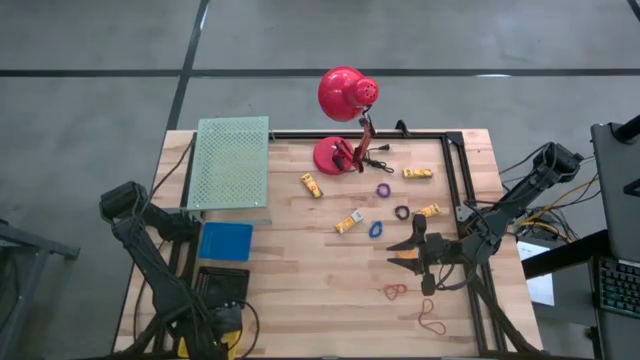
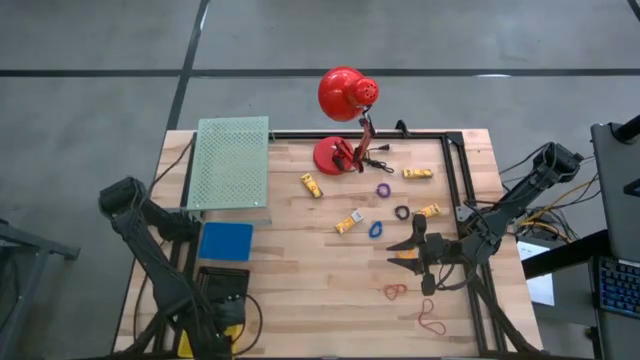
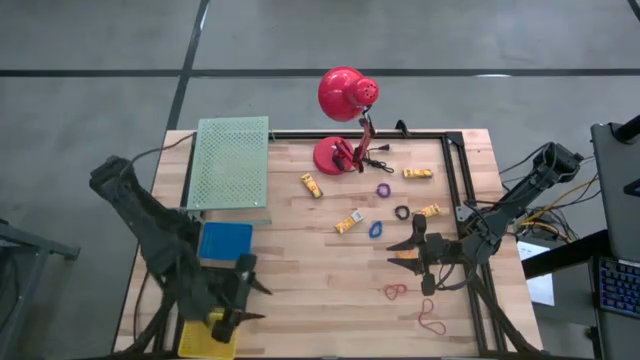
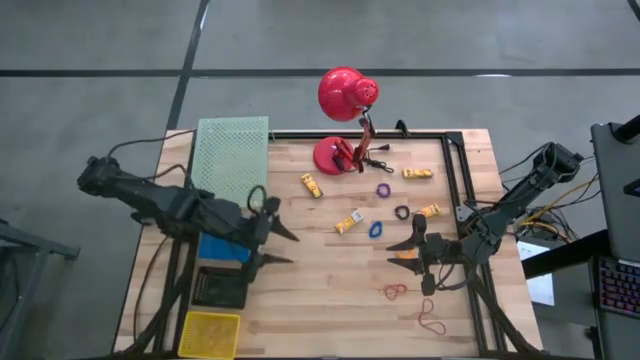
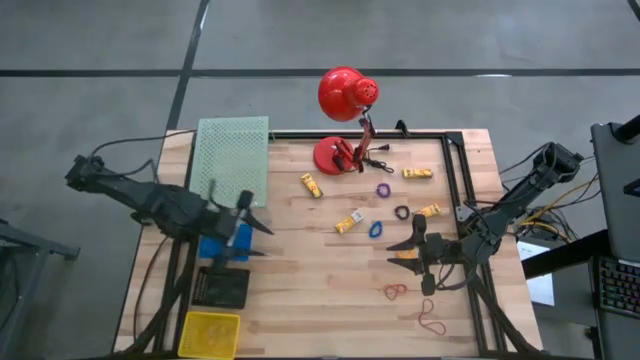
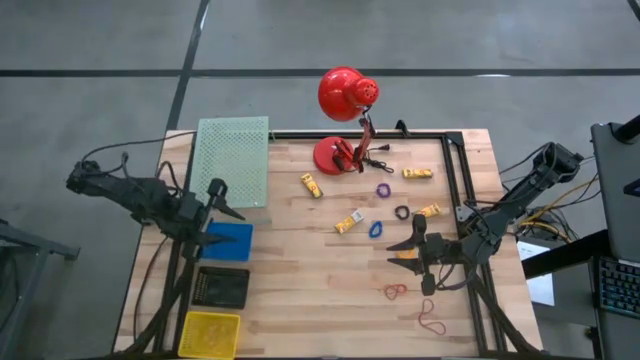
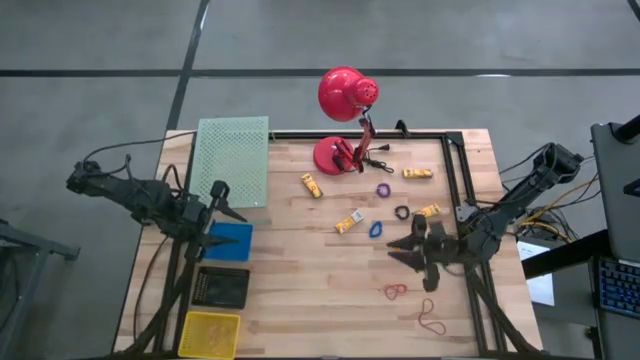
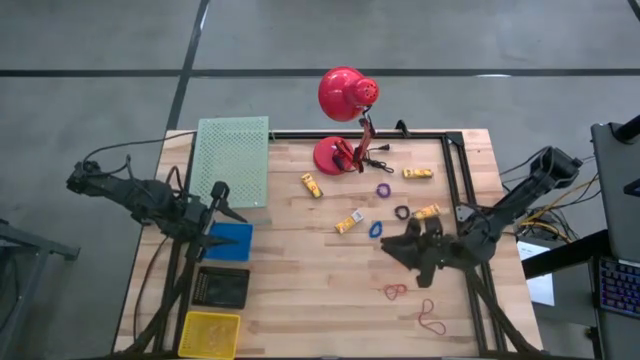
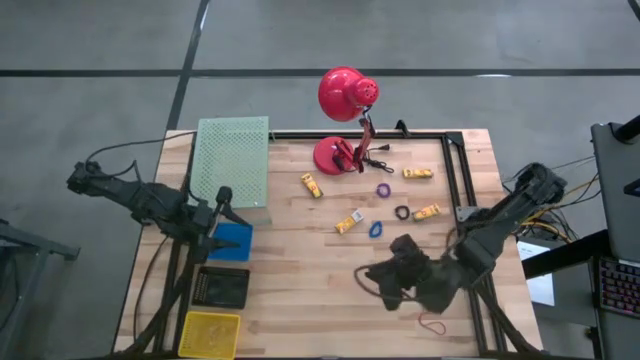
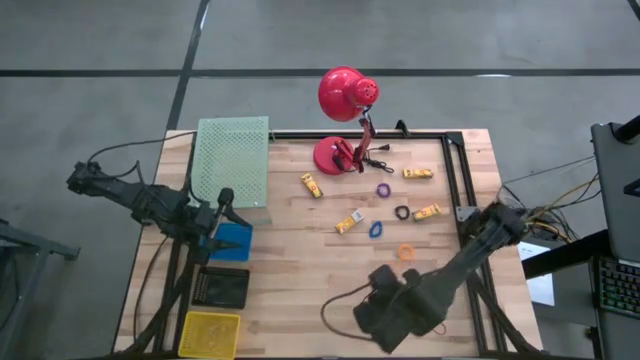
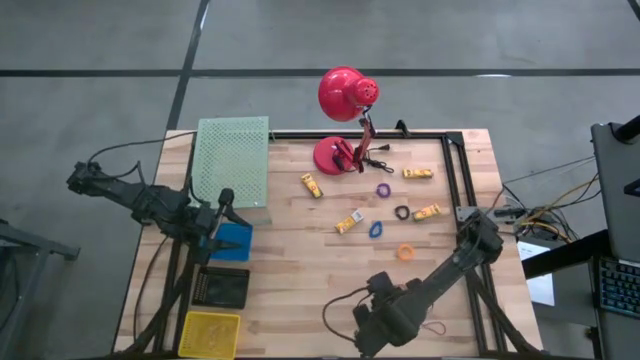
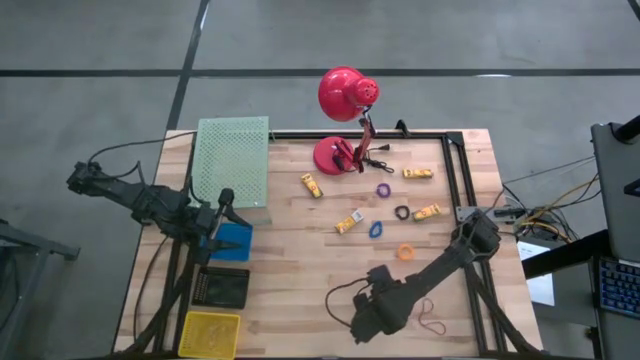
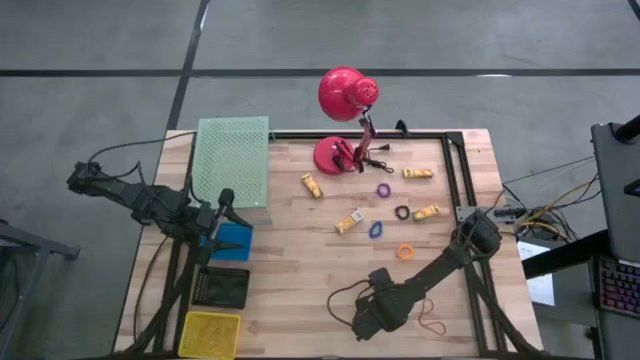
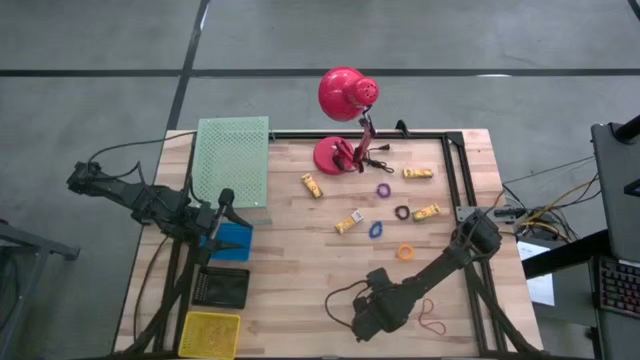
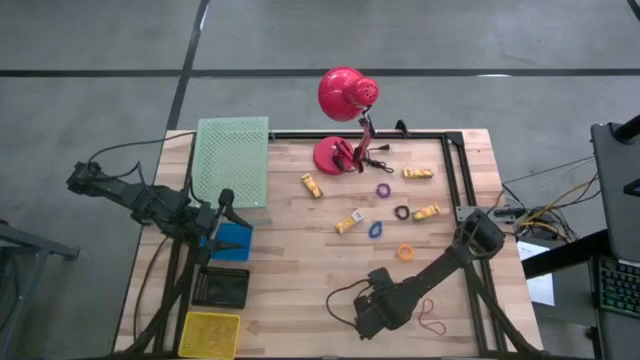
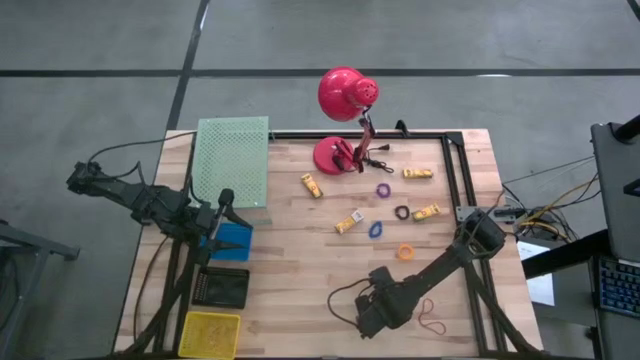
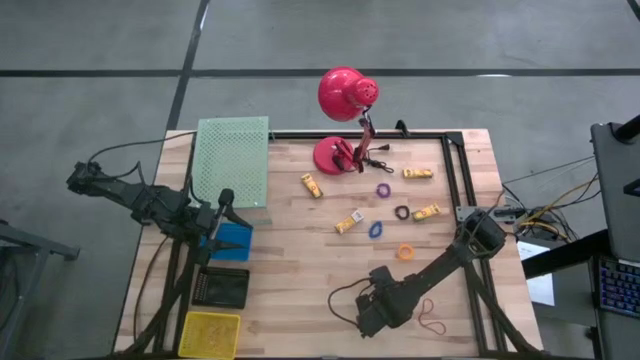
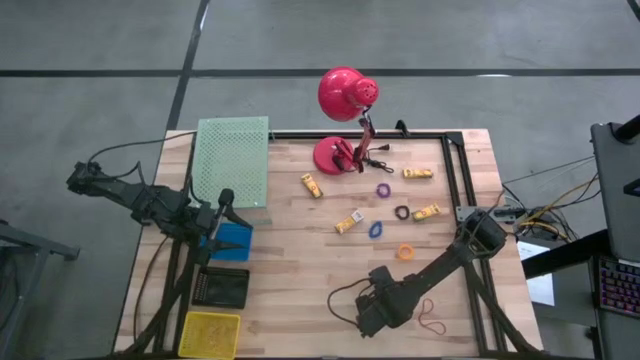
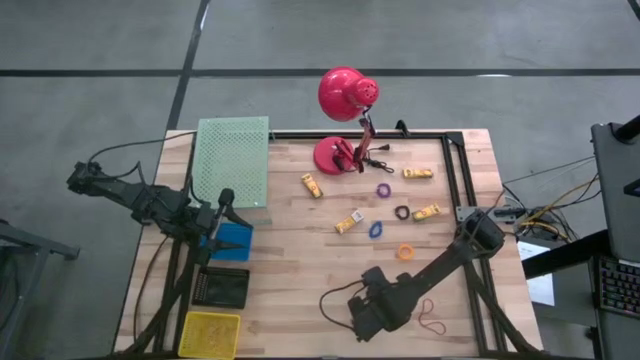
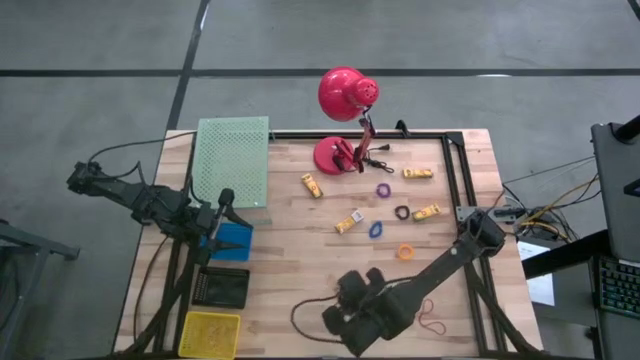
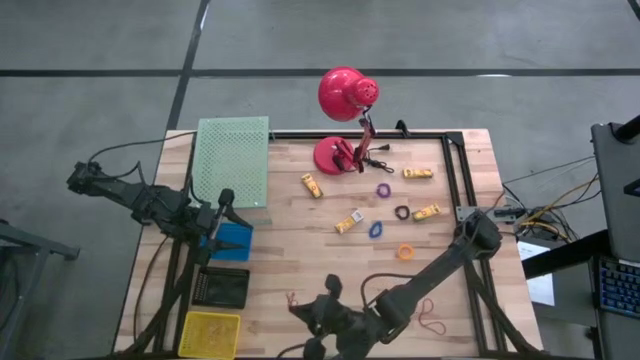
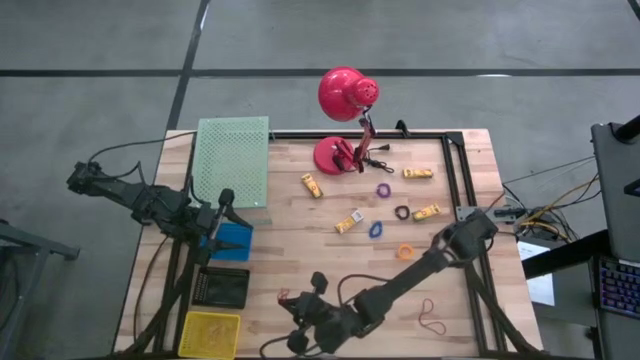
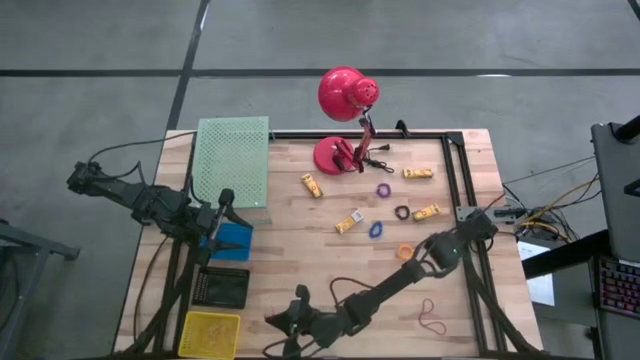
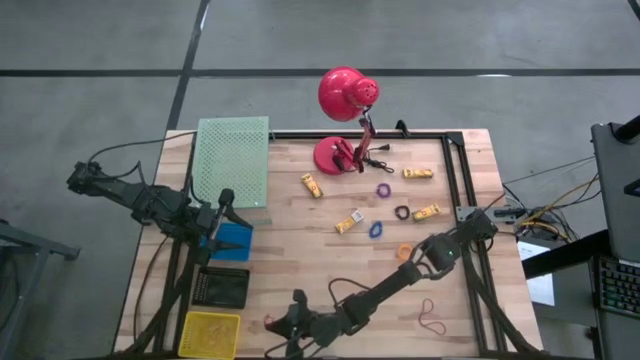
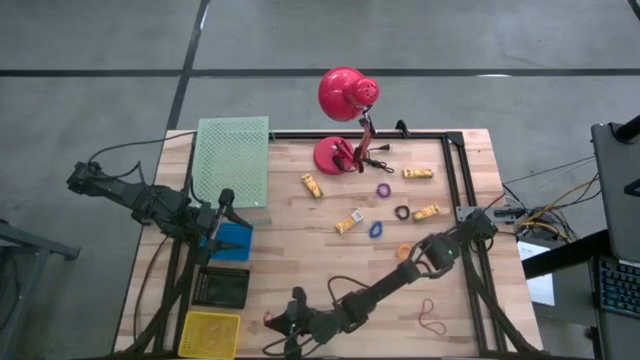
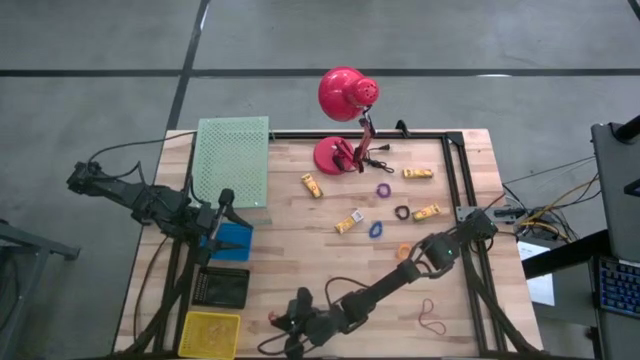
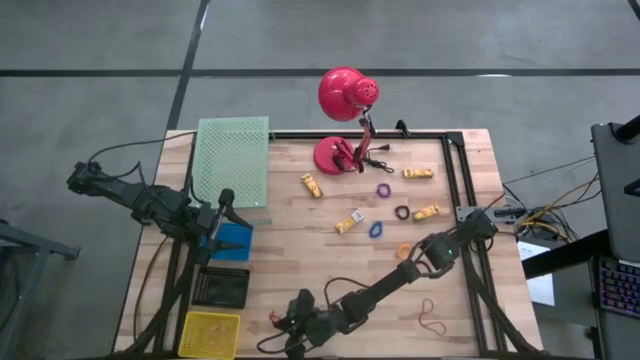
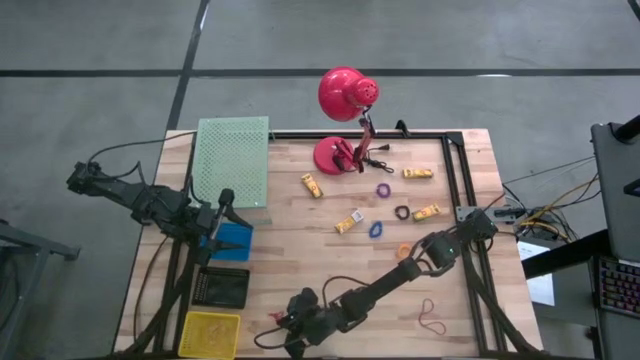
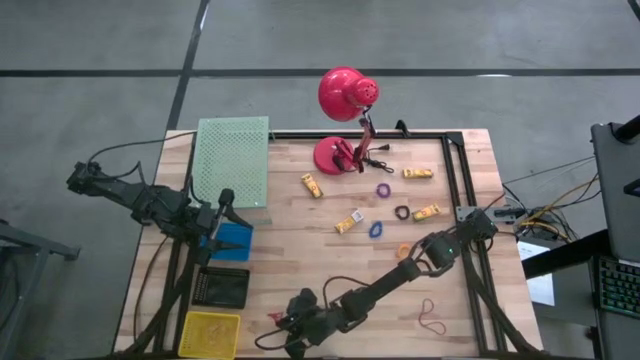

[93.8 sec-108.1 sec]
Task: Pick & Place Office Desk Supplies
Put the top red rubber band into the yellow bin

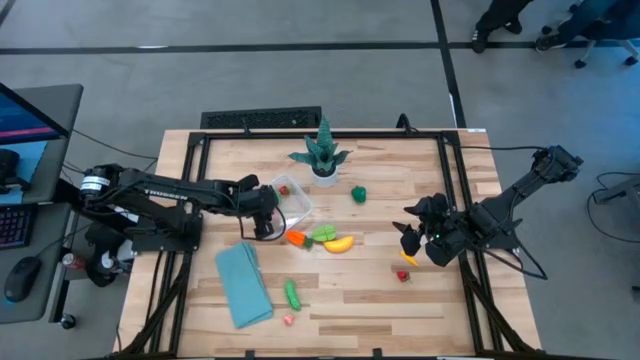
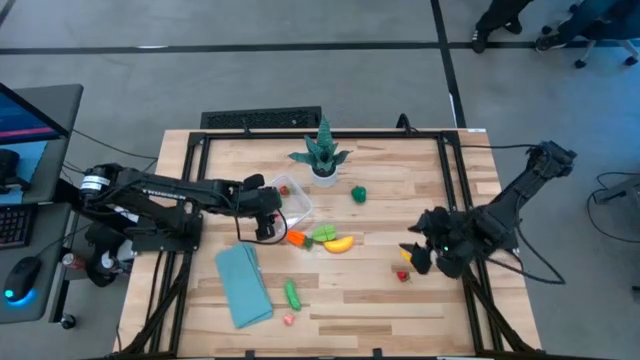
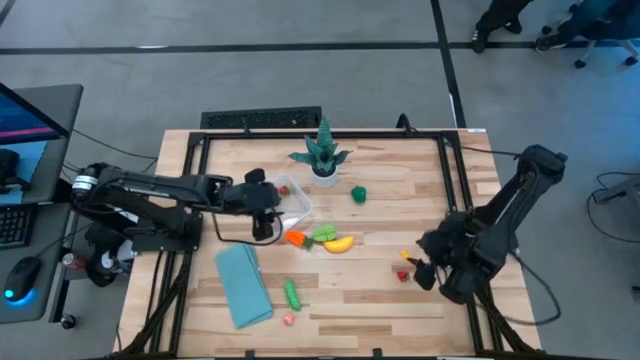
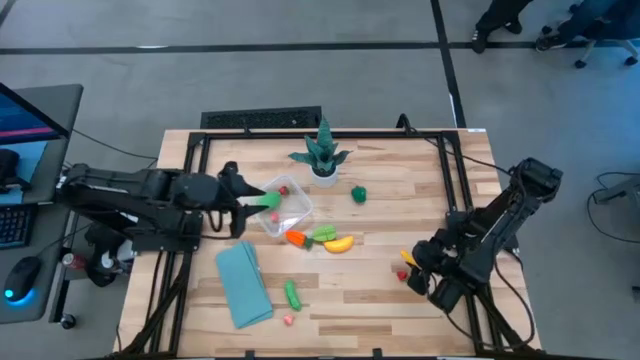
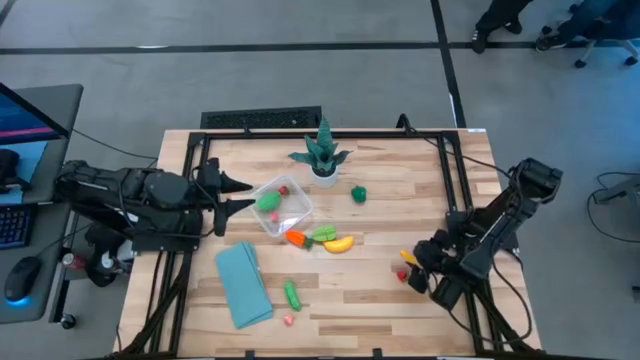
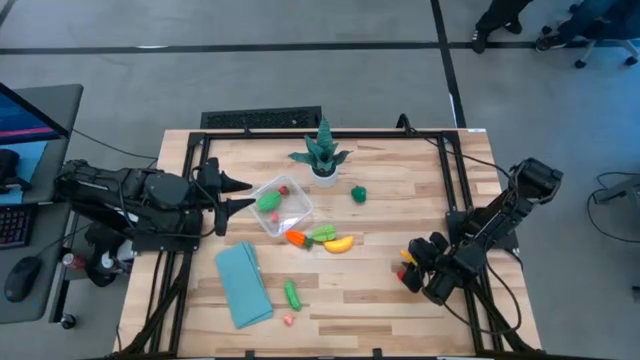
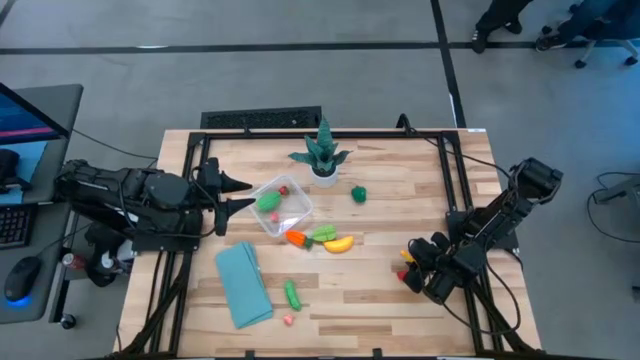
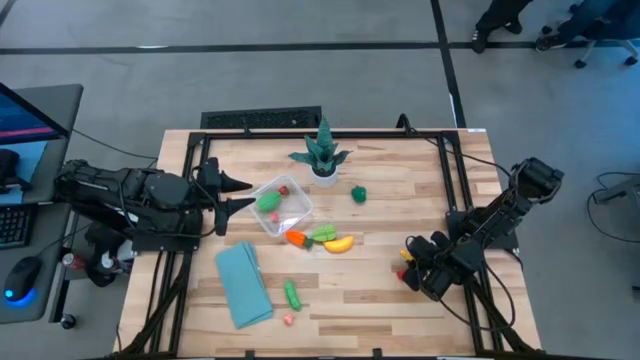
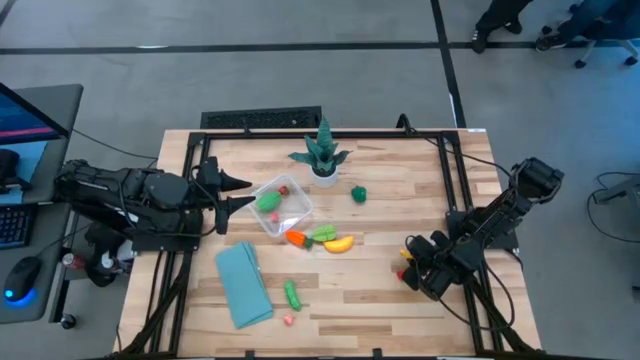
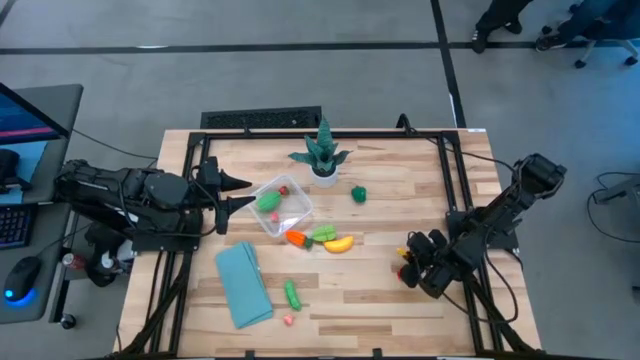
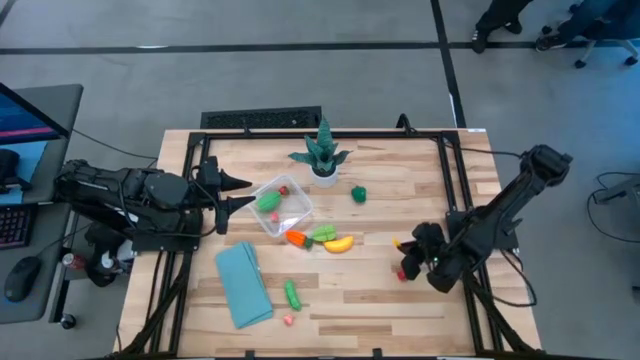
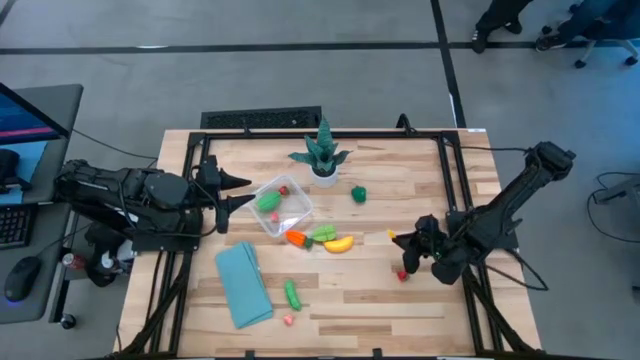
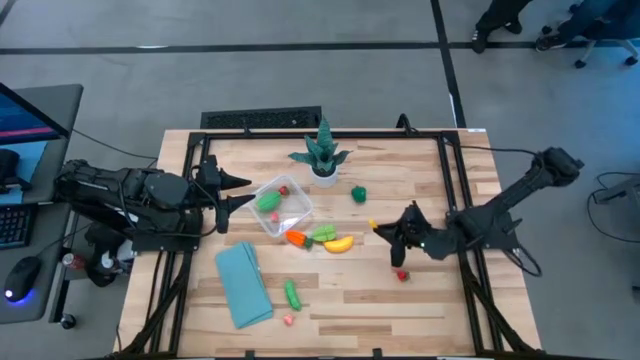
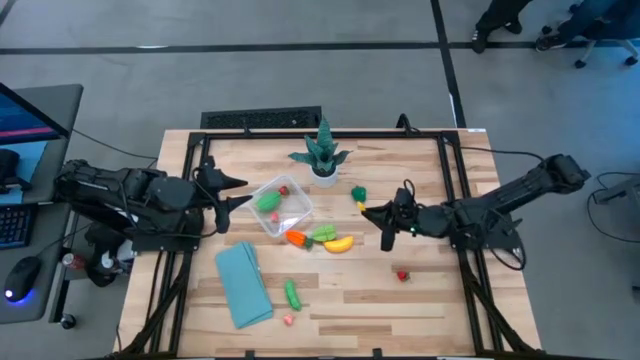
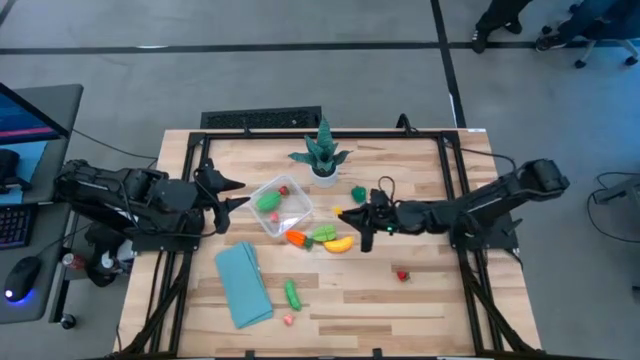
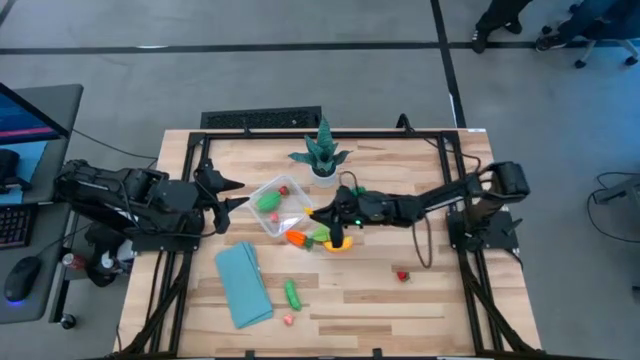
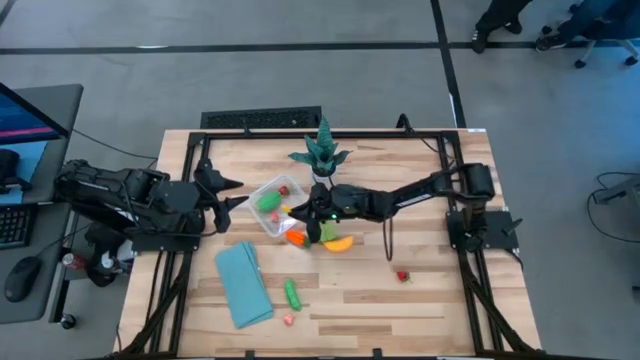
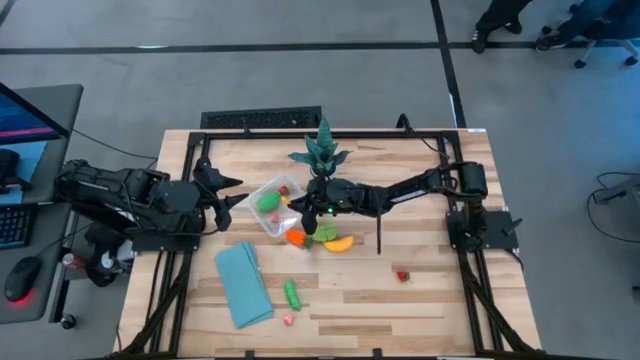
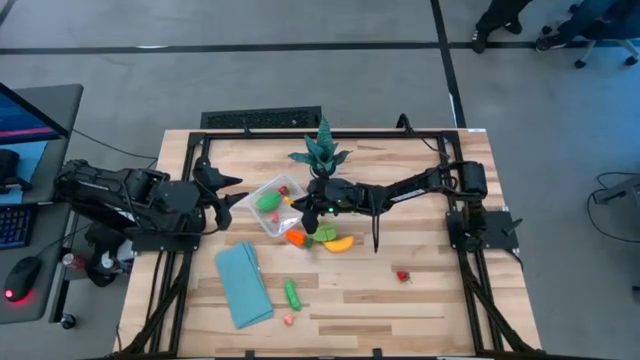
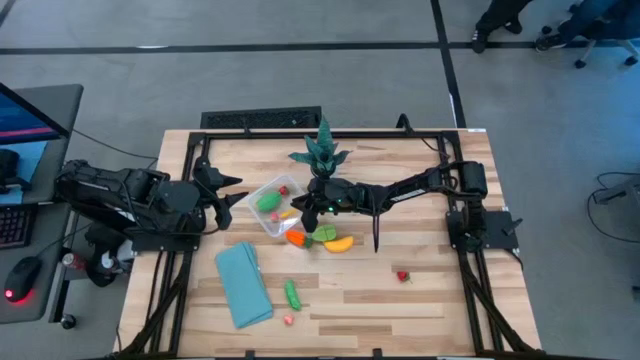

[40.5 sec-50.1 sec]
Task: Pick and placing Produce into tupperware
Put the yellow chili pepper into the transparent container
